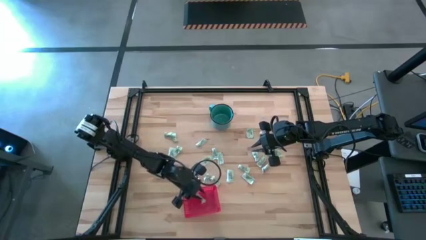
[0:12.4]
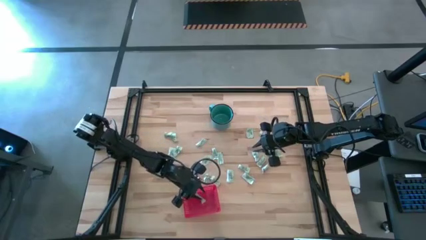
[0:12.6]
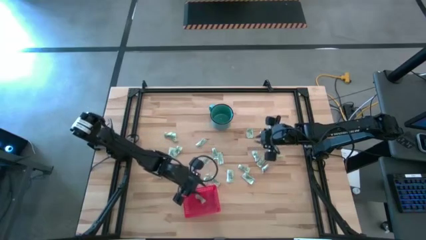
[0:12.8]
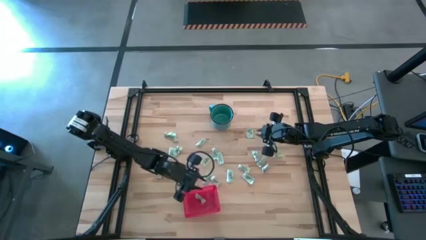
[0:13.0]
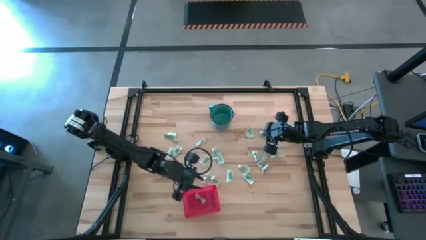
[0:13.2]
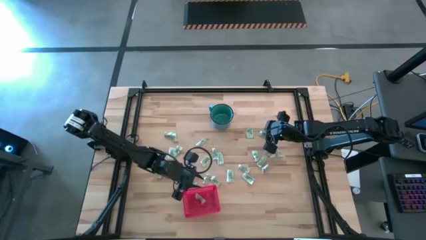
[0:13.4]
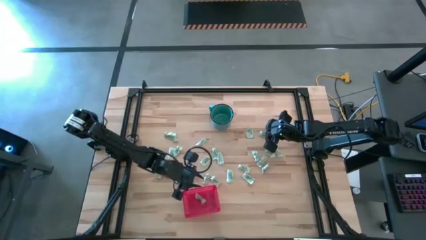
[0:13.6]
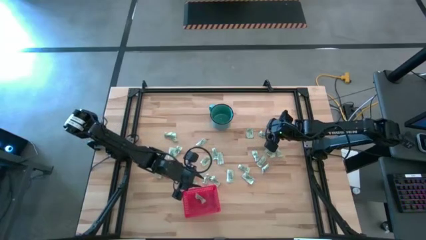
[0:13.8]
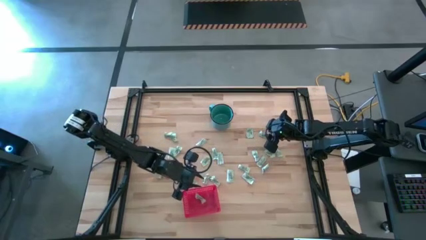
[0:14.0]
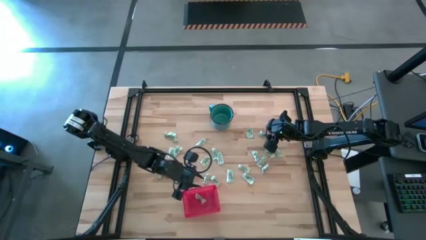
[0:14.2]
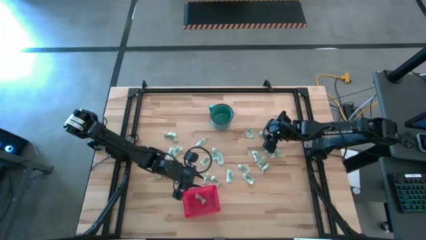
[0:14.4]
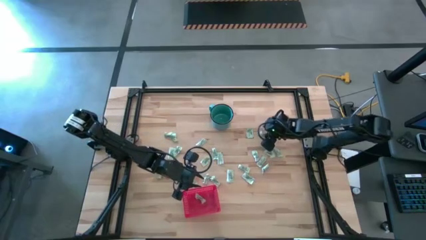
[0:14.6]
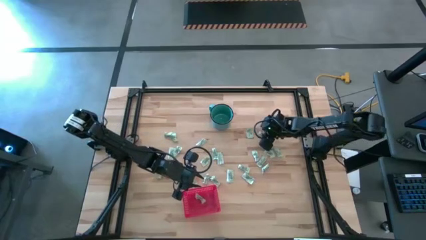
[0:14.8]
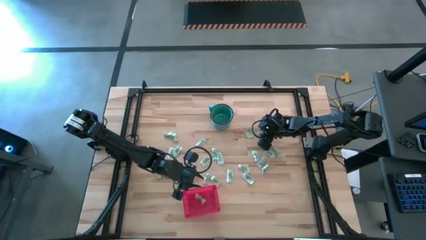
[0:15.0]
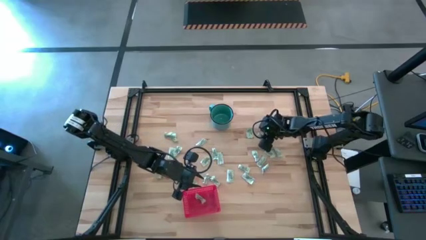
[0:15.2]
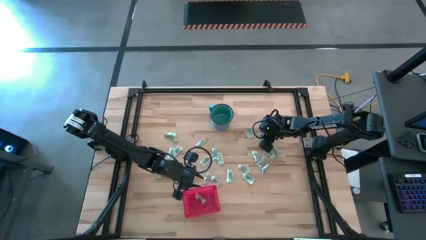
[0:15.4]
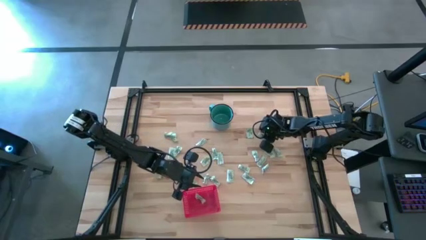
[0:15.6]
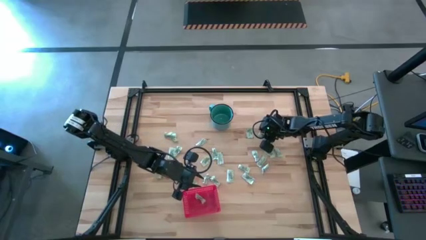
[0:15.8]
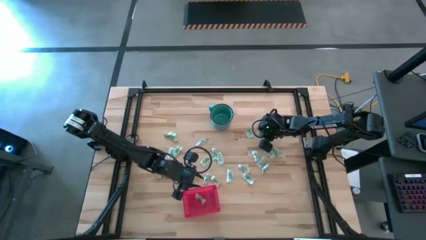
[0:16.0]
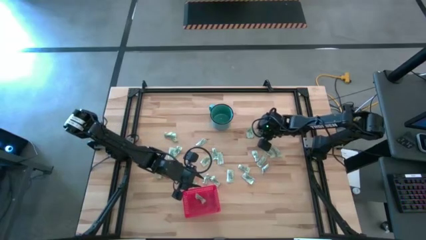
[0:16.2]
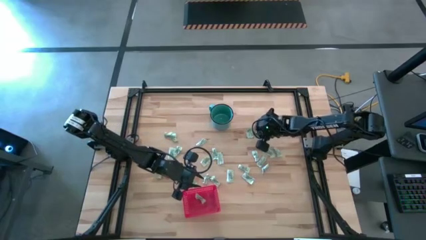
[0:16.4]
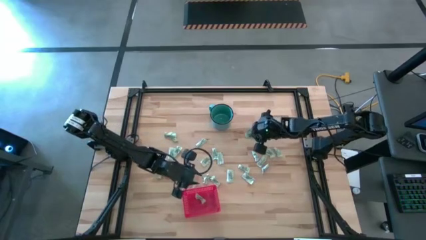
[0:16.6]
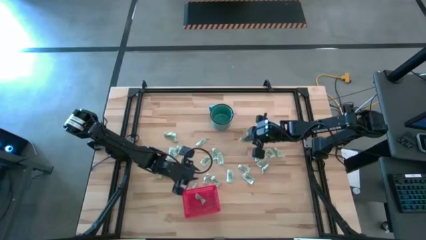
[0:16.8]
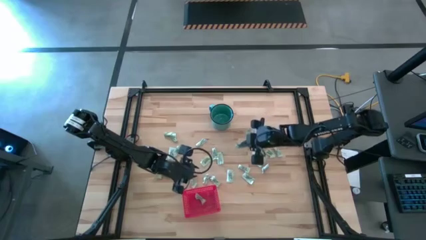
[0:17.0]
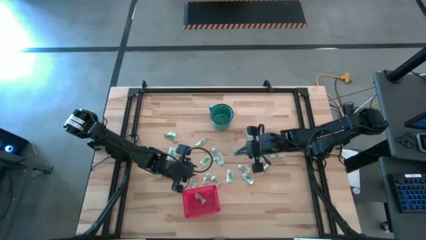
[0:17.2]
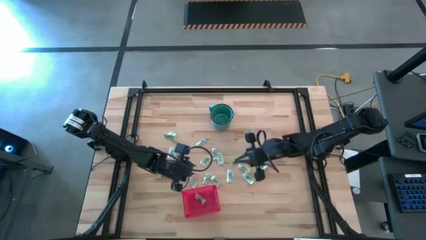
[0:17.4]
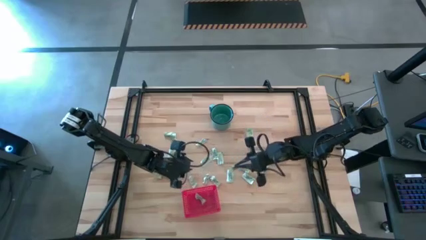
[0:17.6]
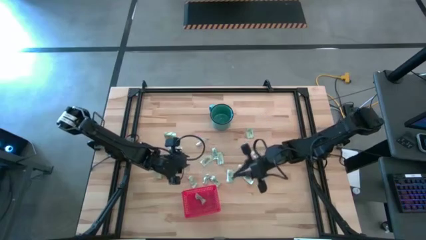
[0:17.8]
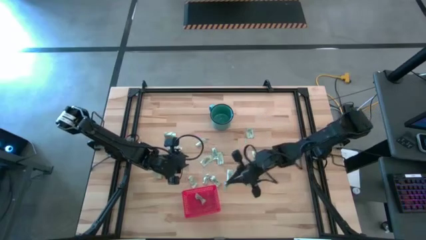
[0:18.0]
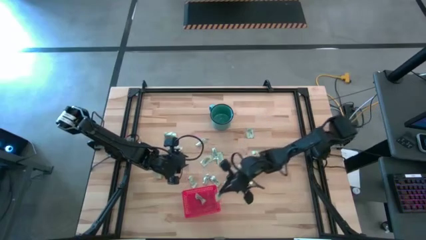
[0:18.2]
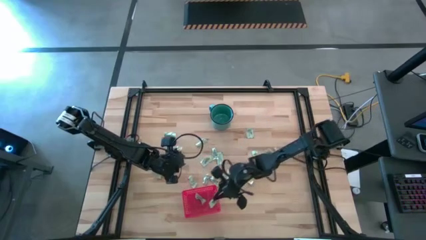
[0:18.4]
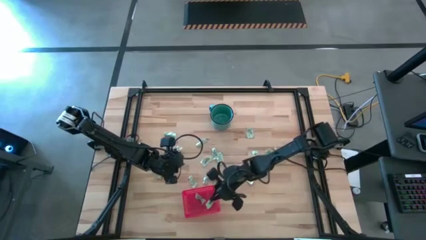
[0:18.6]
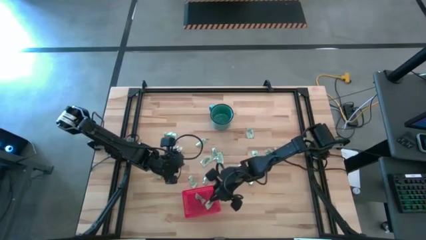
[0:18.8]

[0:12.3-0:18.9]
Task: Pick and place items into bin
Put the green stevia packet into the red bin

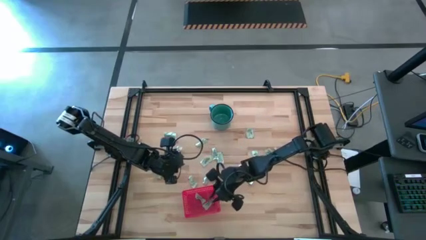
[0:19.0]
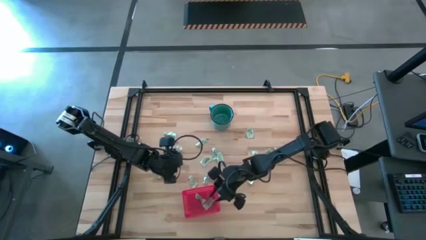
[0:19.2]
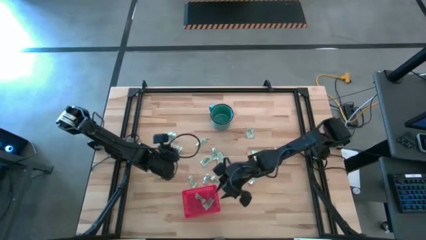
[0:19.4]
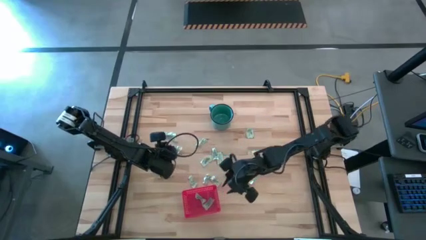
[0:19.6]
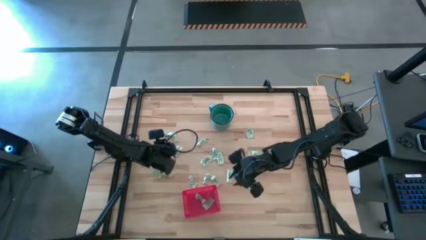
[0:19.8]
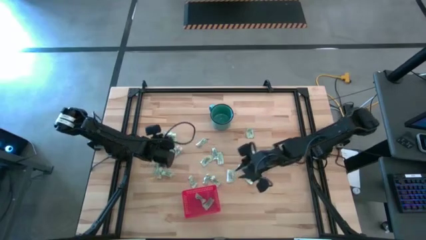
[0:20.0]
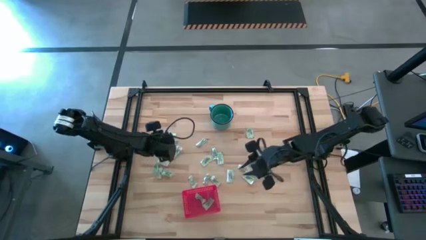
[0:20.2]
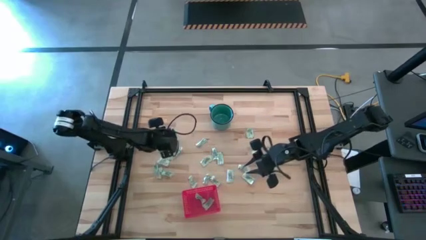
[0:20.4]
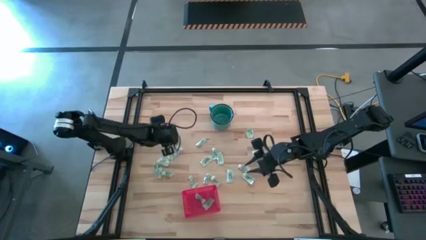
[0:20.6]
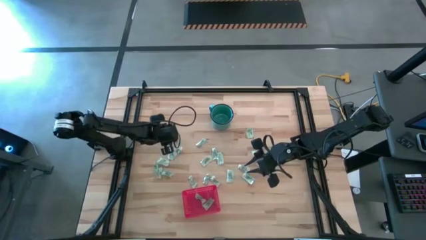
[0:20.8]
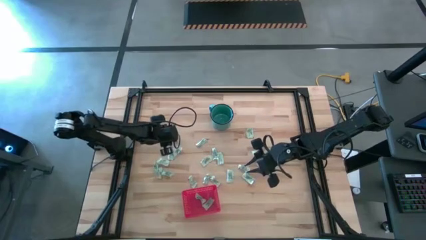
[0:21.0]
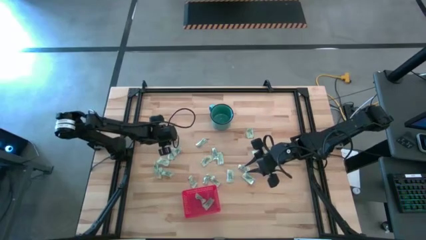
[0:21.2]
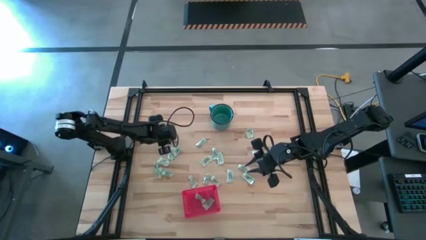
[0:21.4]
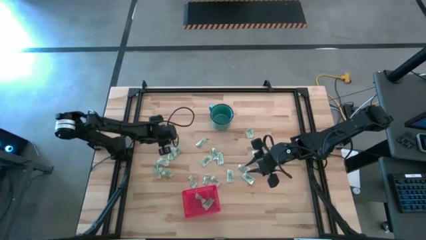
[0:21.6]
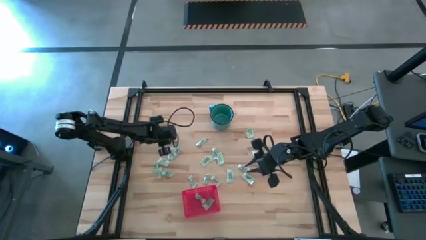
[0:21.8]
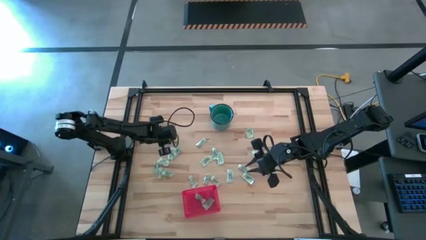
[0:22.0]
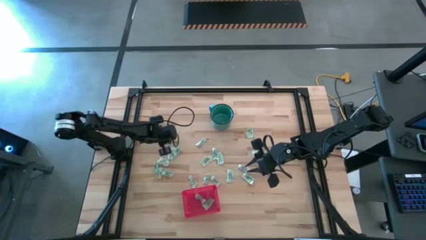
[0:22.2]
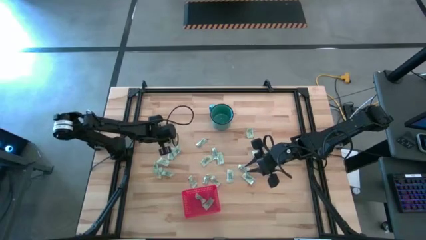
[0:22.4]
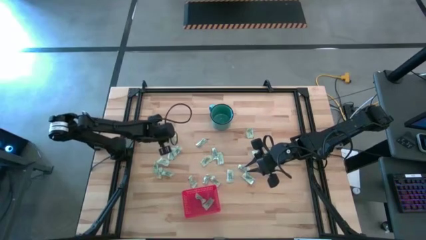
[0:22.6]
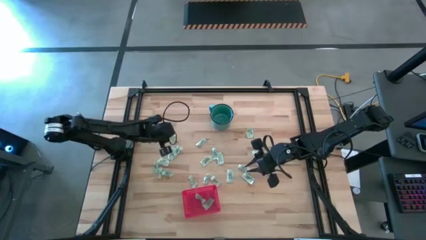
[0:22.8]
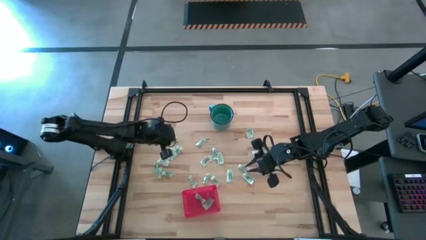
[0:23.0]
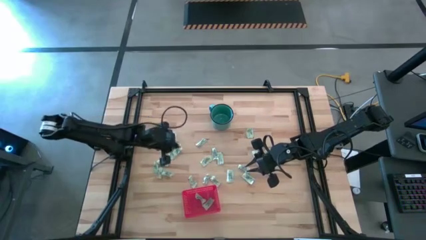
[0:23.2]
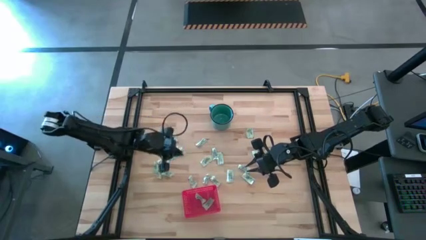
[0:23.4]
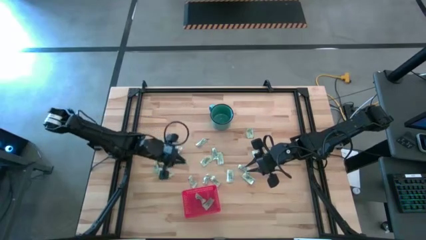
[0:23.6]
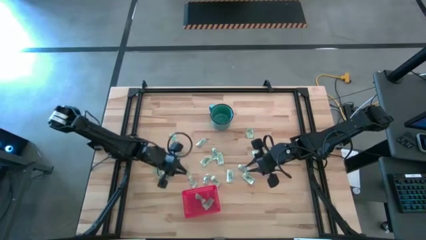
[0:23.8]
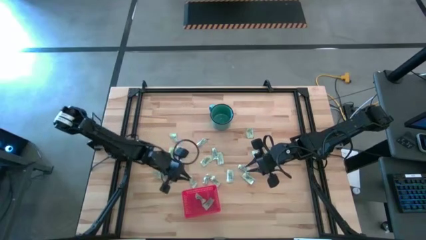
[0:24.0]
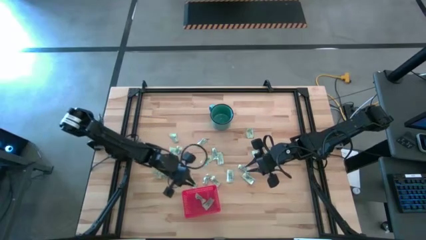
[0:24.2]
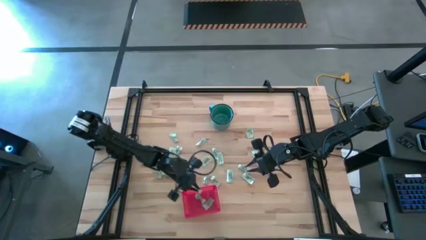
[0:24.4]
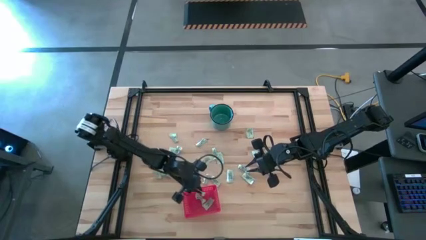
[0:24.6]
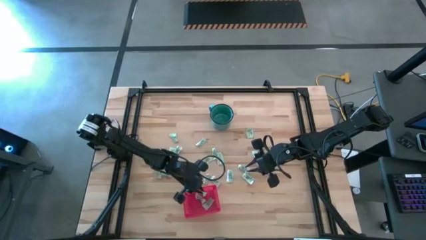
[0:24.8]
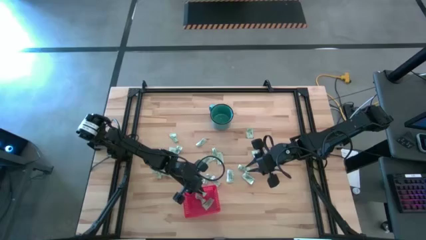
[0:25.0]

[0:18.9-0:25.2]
Put the green stevia packet into the red bin

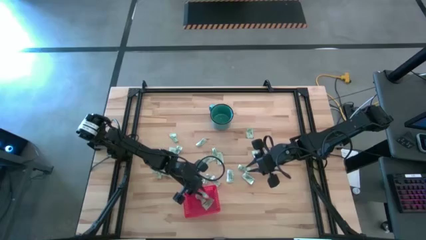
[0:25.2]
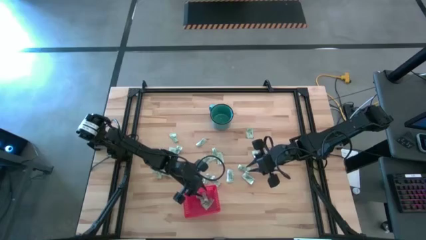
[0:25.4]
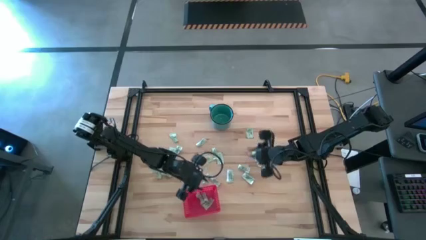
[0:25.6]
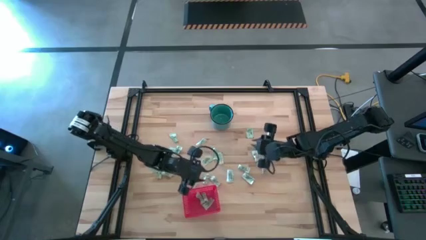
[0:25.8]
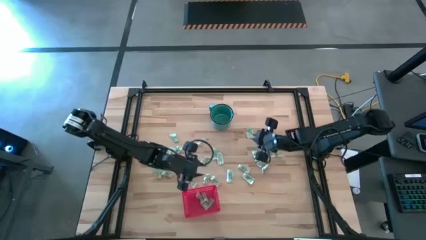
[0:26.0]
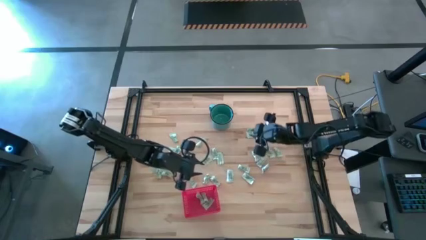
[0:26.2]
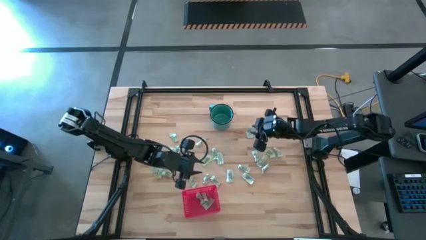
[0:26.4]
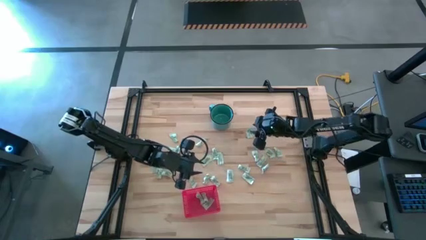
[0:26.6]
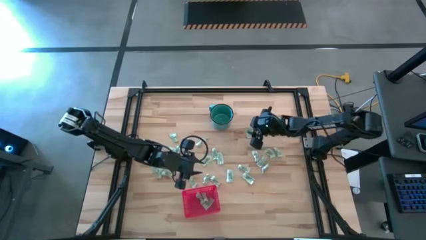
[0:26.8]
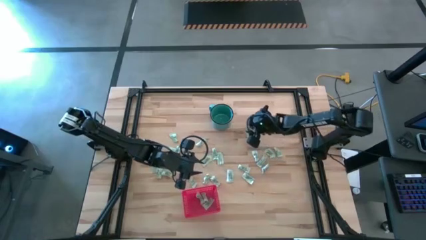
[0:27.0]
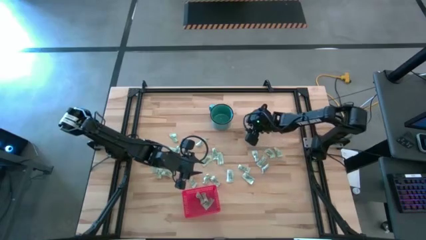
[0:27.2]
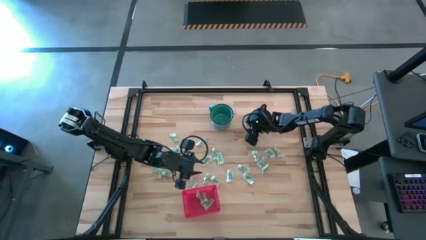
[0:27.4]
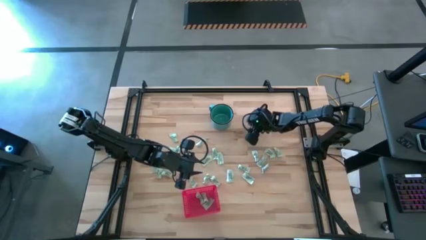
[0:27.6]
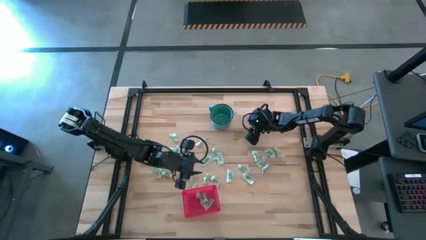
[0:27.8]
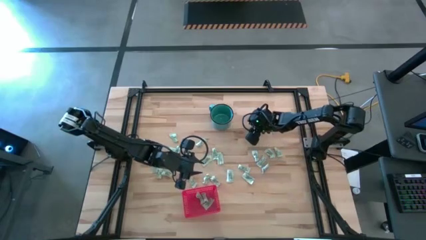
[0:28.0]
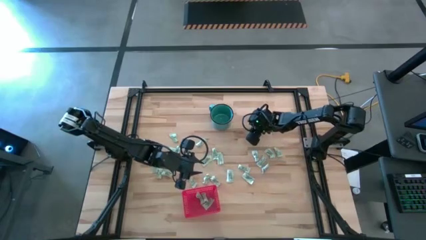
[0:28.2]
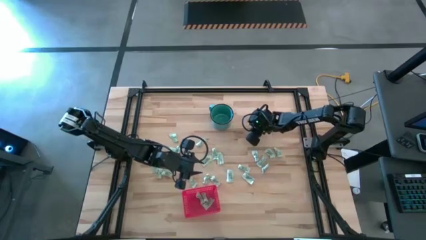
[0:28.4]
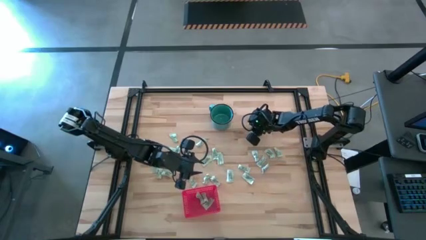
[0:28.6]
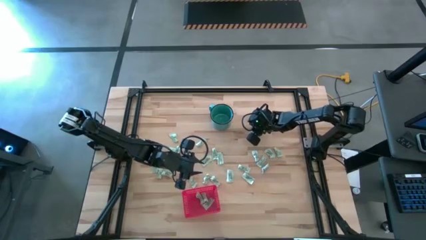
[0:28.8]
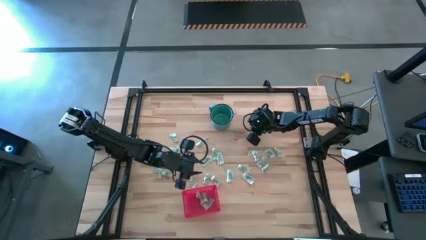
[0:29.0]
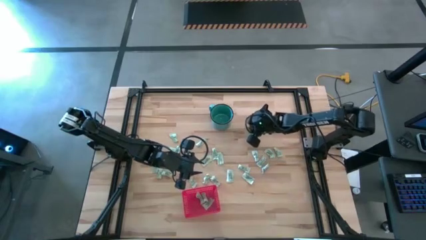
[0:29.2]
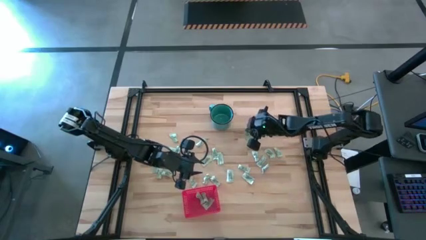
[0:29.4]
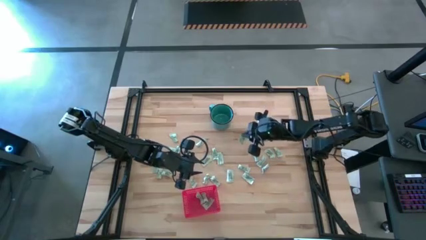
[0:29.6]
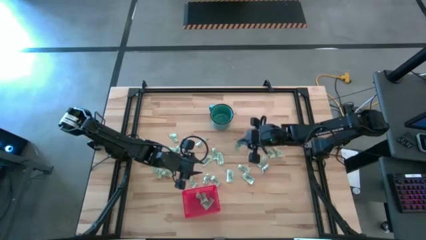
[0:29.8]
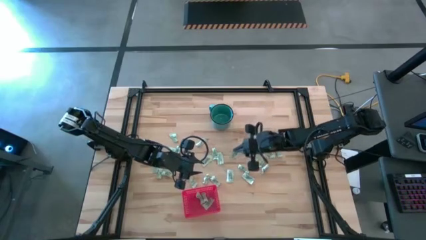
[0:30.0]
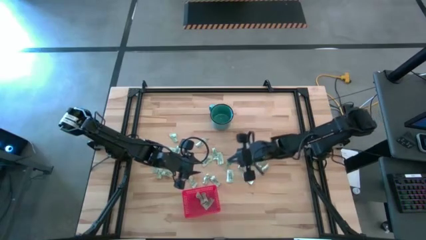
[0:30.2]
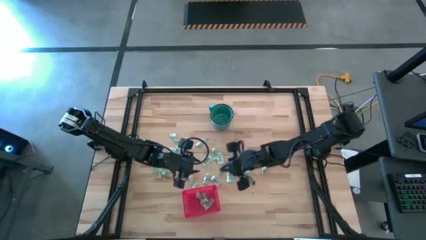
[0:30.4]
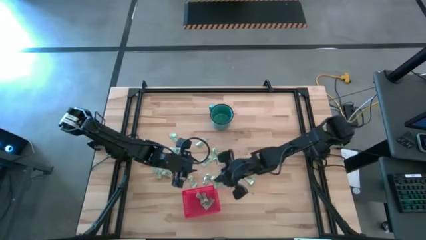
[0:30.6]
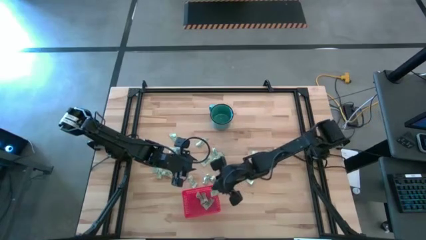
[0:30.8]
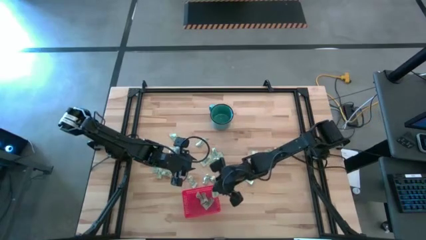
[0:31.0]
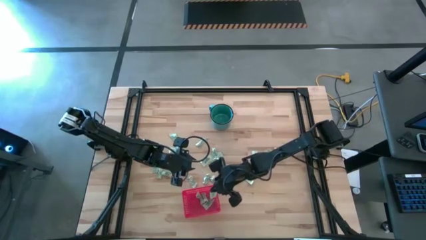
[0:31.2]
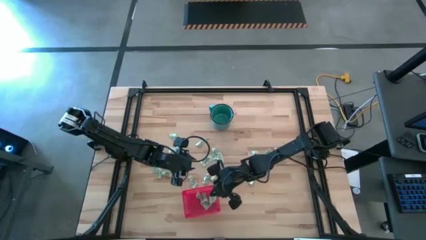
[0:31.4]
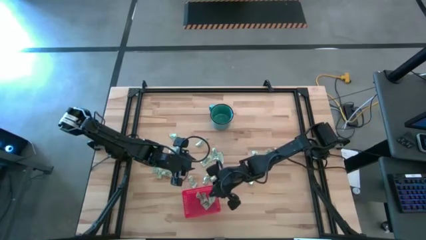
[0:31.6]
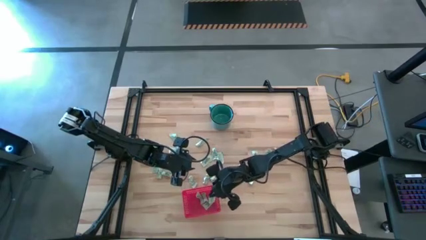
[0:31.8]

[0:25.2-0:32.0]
Put the green stevia packet into the red bin
